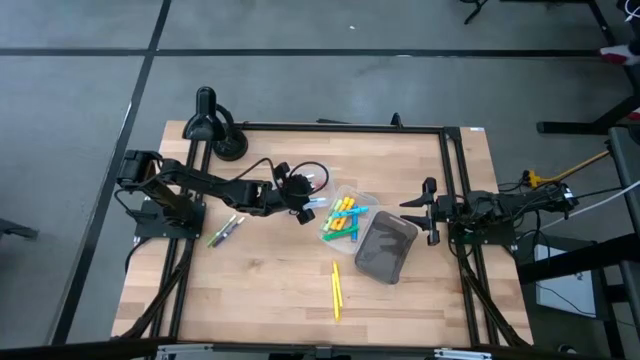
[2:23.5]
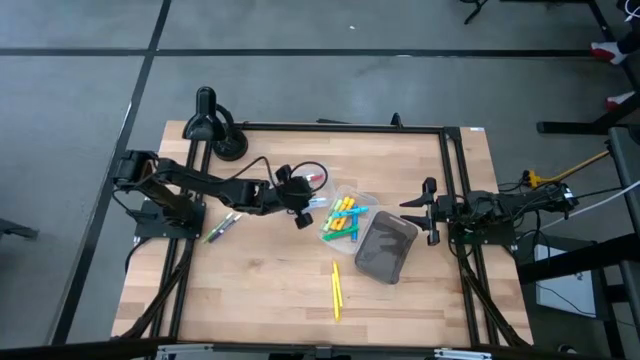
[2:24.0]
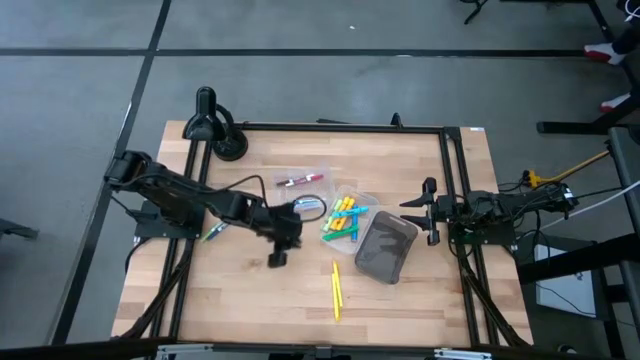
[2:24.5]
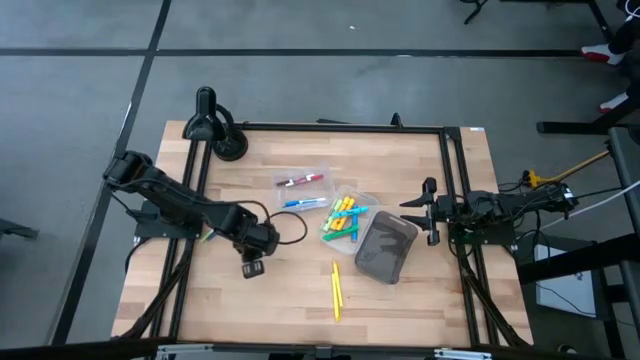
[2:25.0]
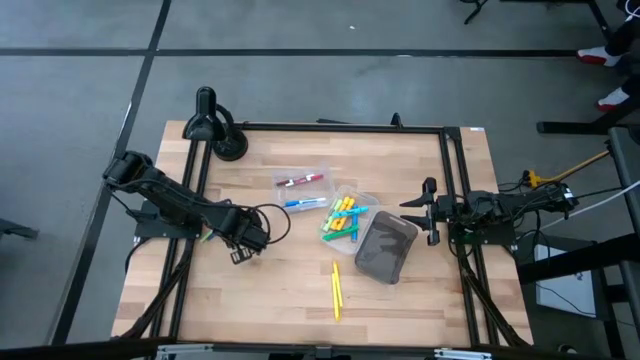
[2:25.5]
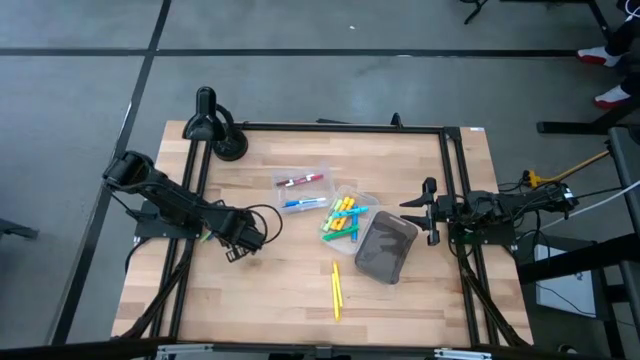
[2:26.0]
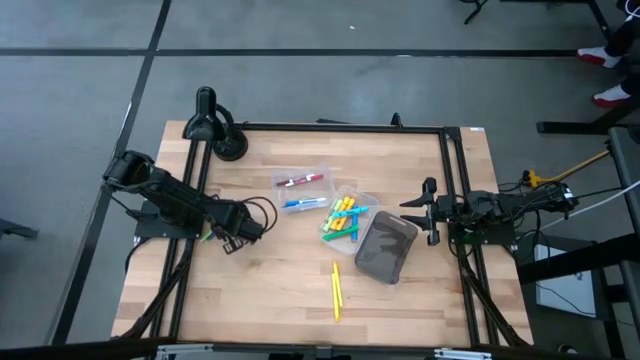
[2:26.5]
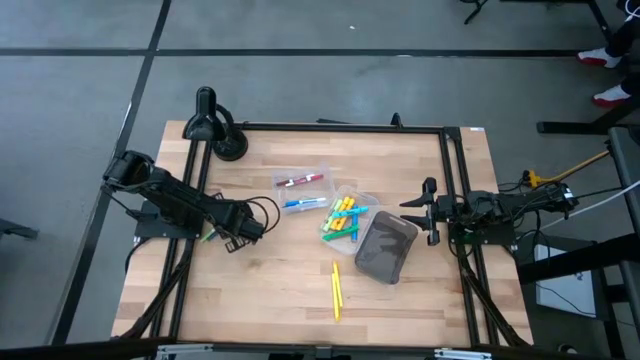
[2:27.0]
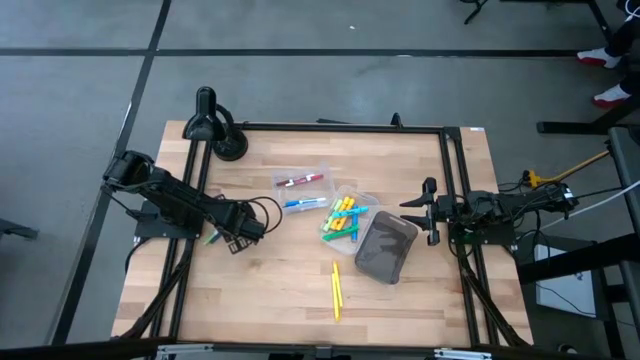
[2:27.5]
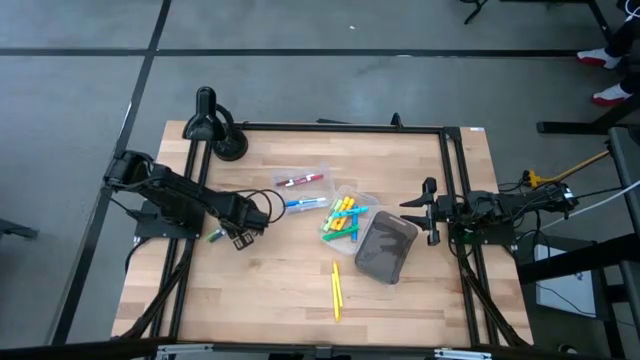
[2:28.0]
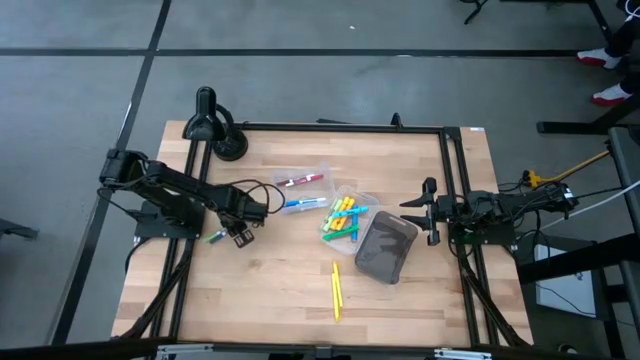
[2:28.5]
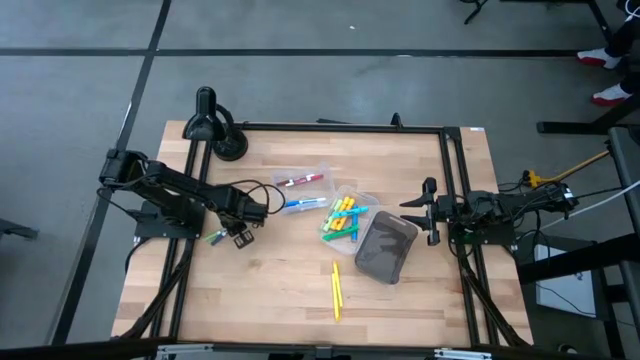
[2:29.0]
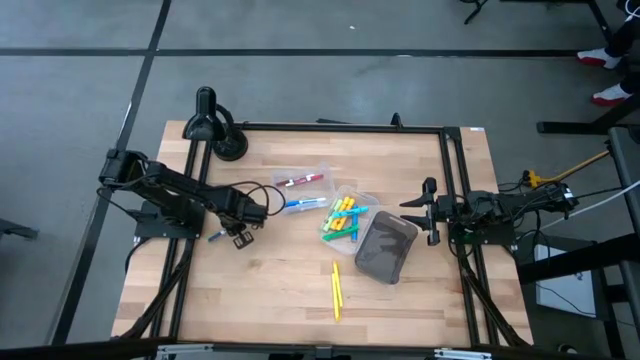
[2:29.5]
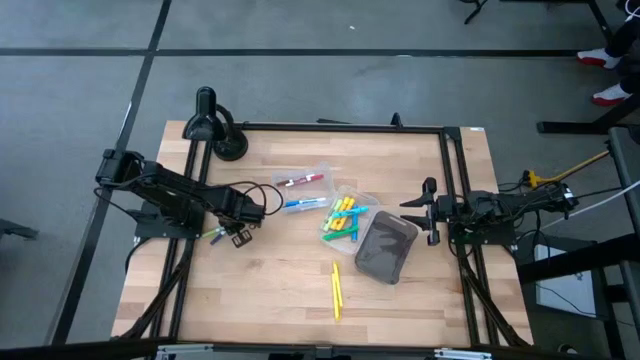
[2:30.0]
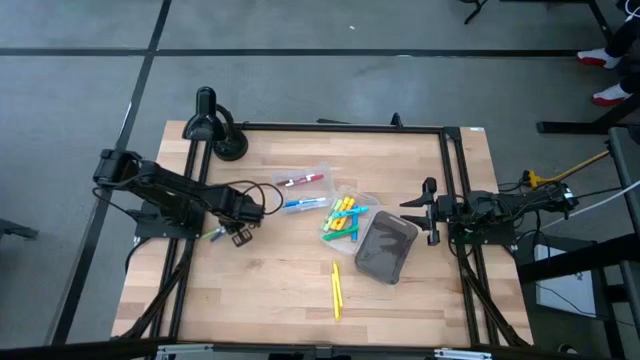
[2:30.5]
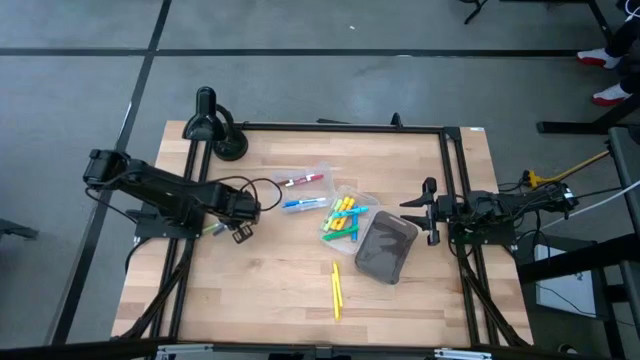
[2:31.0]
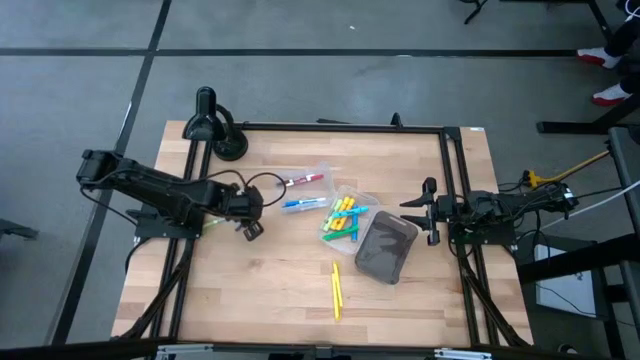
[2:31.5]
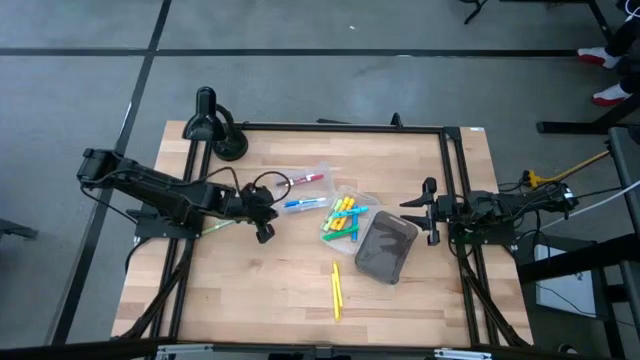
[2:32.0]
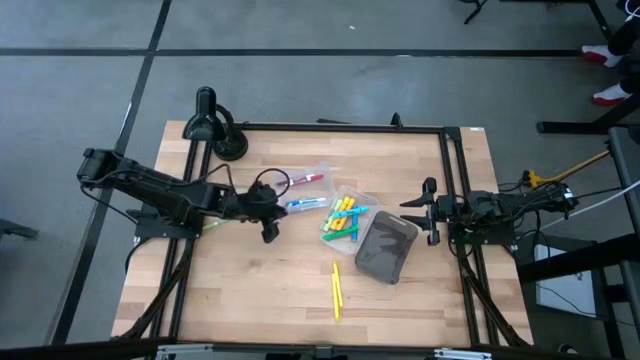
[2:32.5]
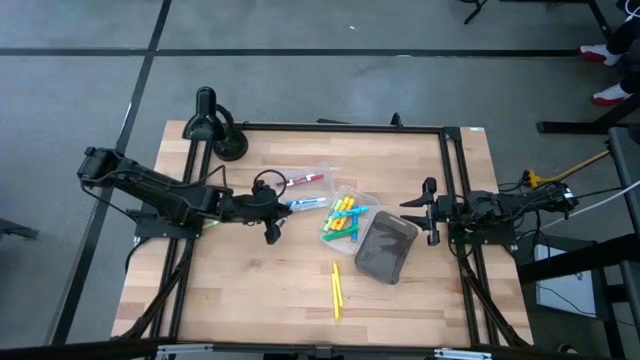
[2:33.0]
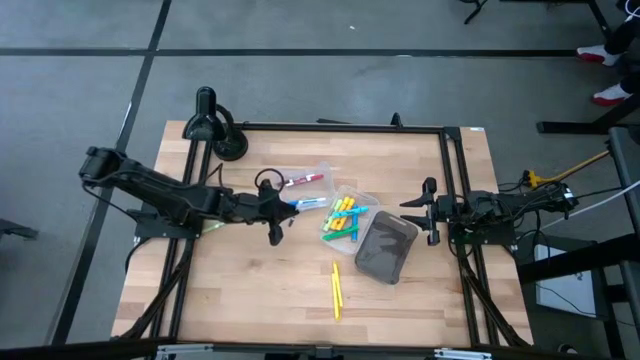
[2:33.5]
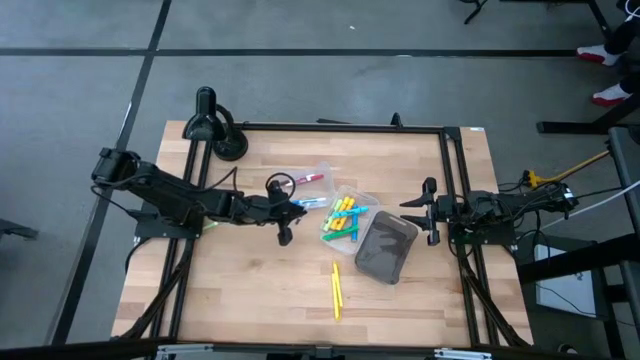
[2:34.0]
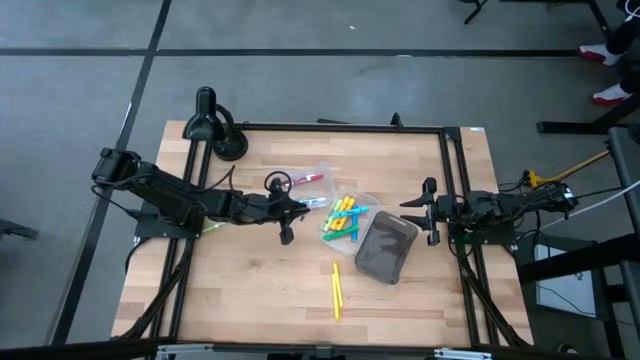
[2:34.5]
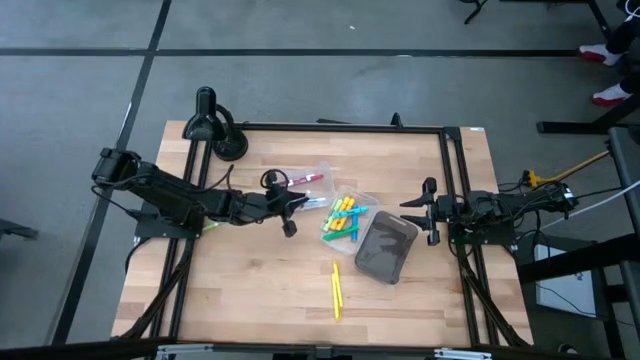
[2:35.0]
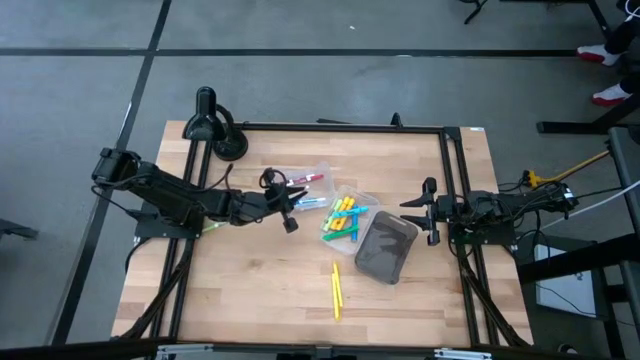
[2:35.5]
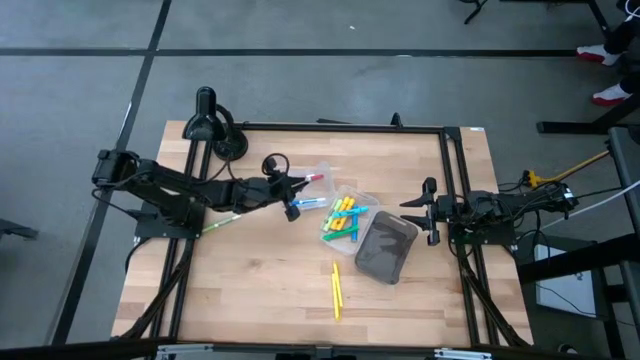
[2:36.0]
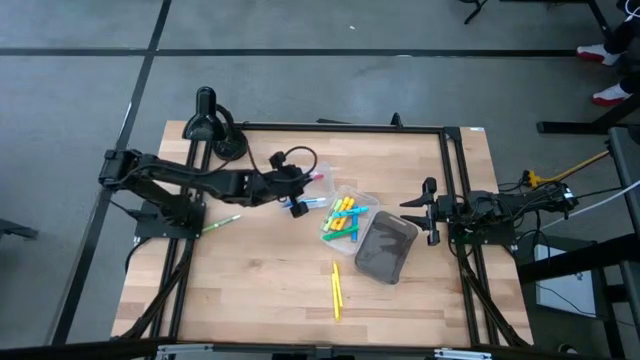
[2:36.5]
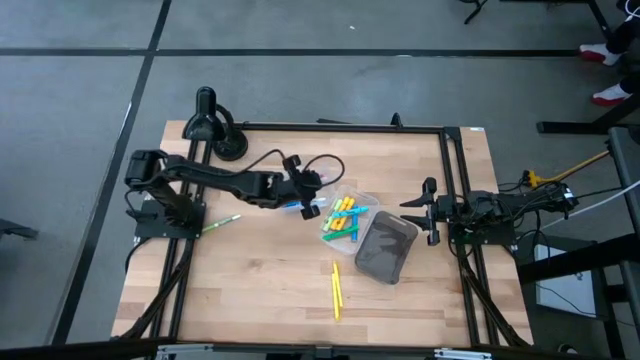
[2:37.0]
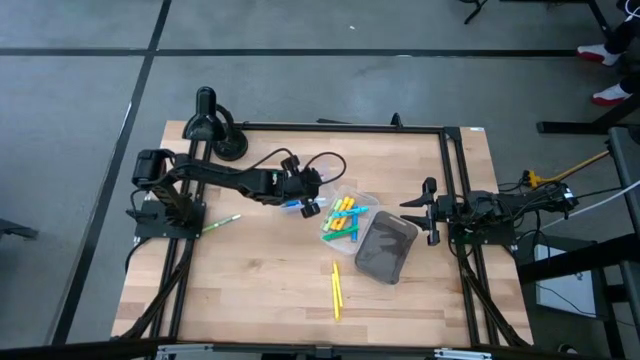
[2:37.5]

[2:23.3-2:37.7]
Task: Pick & Place Markers
Put the blue marker pen into the left transparent bin

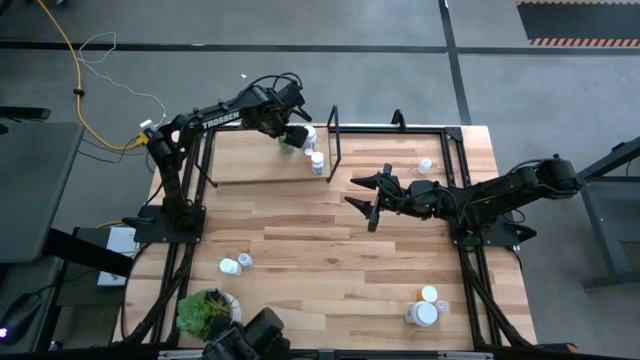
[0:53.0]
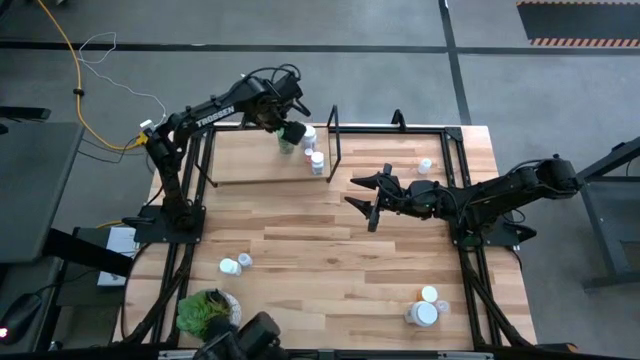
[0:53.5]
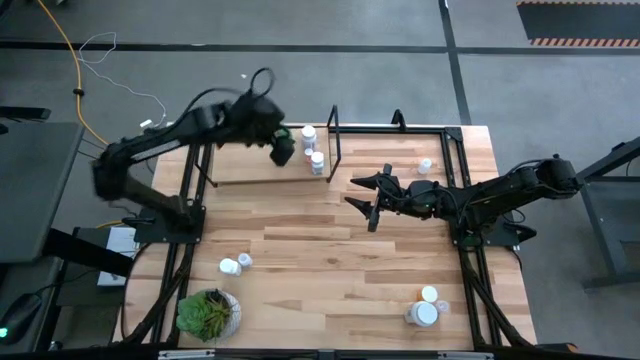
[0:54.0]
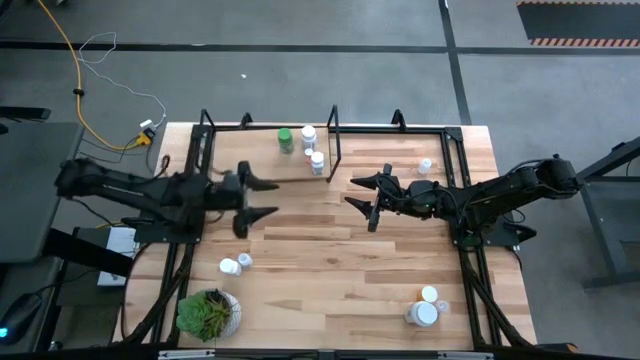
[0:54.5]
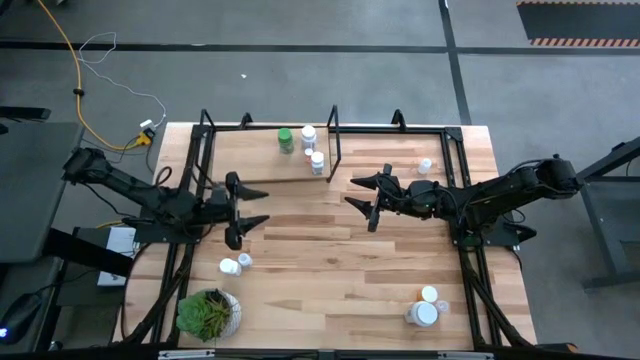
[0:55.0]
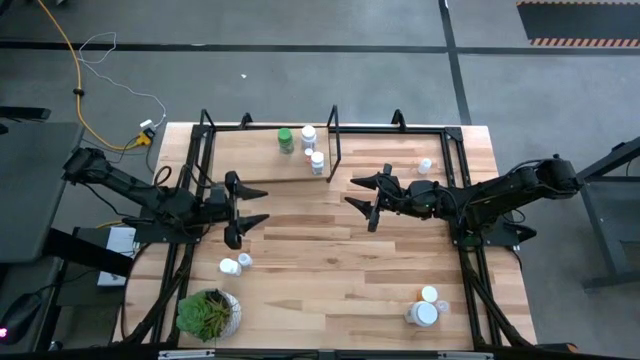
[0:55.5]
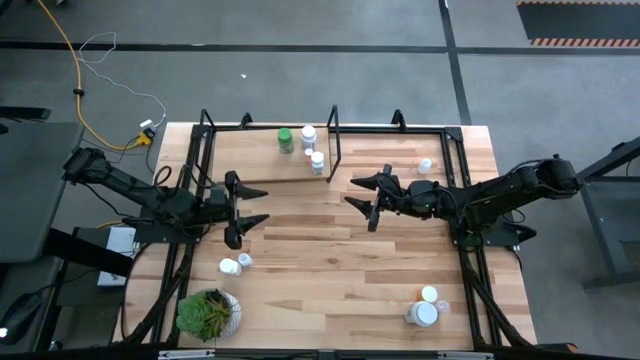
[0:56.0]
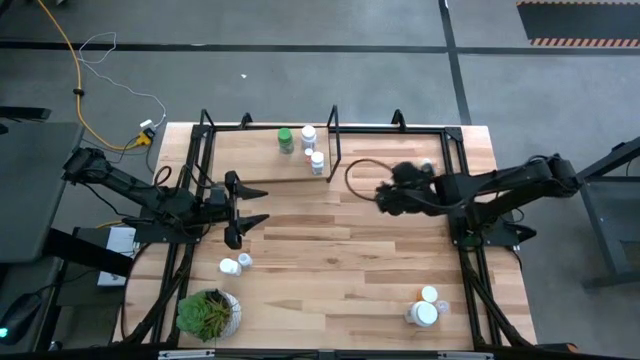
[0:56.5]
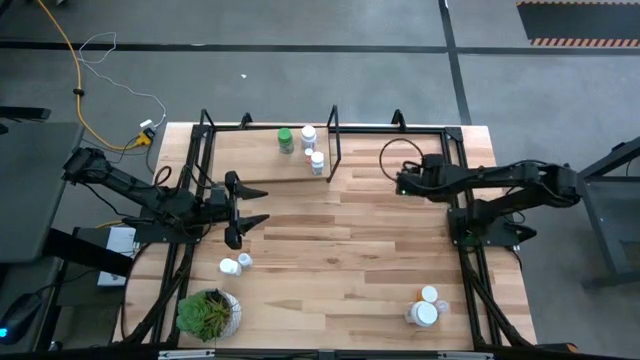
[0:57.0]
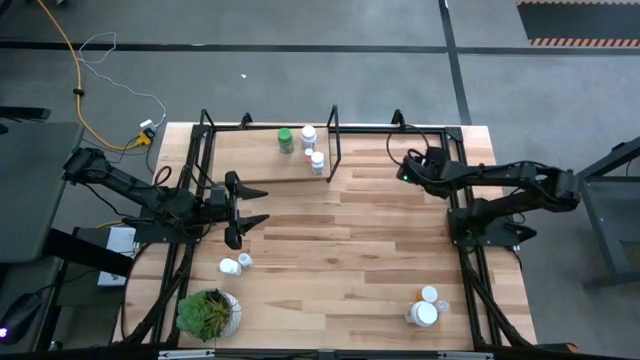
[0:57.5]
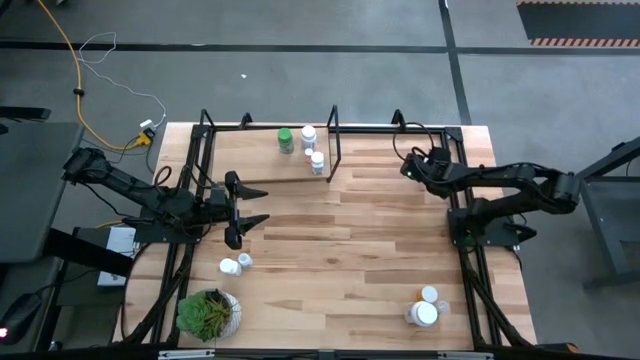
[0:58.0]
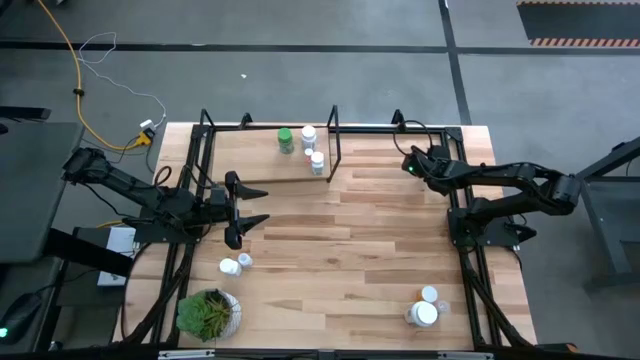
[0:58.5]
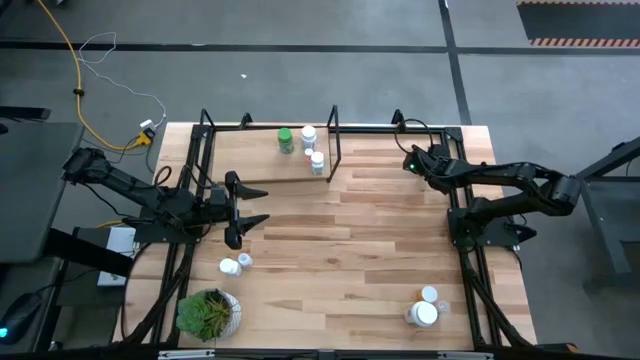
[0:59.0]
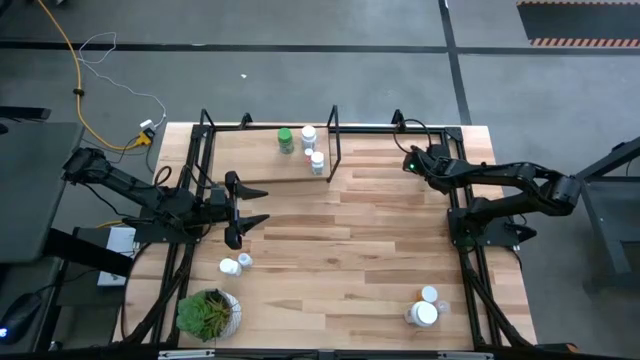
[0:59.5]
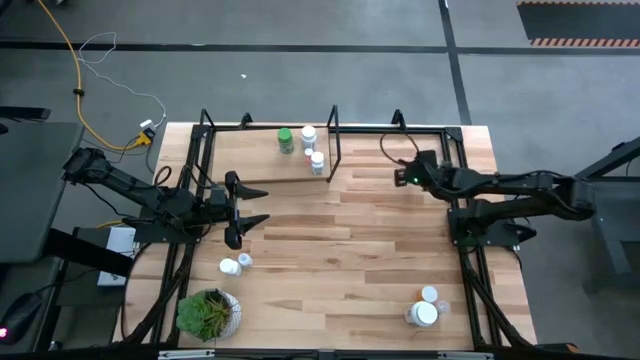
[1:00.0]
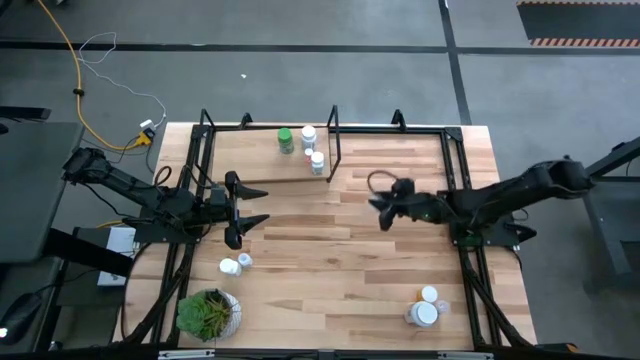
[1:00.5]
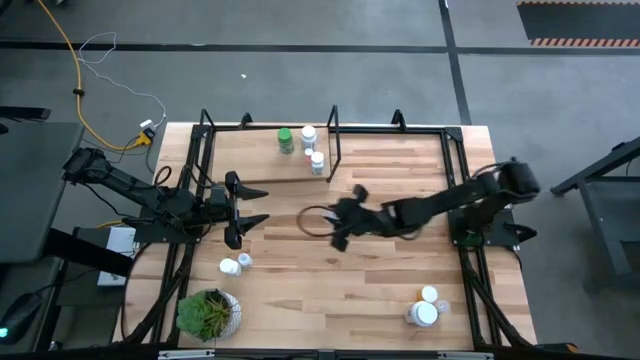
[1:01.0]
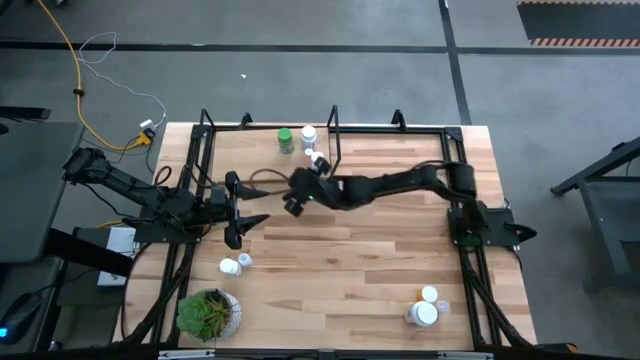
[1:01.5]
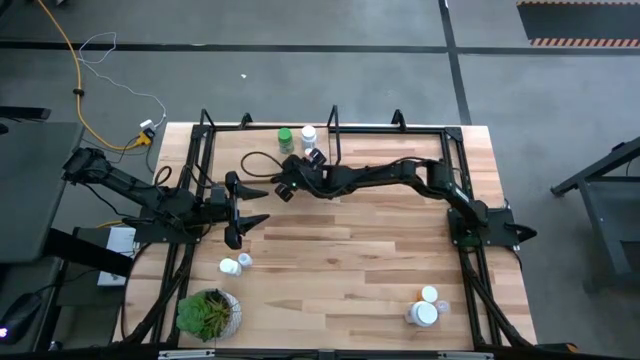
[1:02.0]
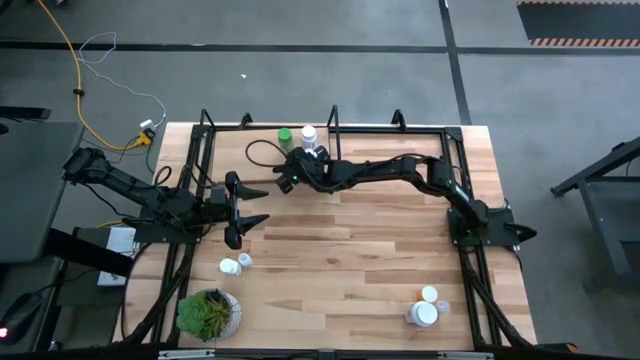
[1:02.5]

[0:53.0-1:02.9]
Task: Pick and place medicine bottles onto shelf by color
Put the small white pill bottle on the shelf
